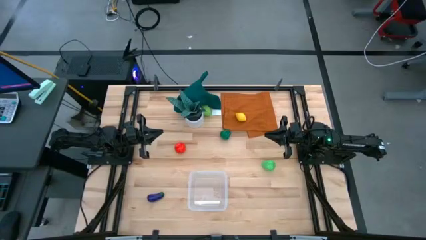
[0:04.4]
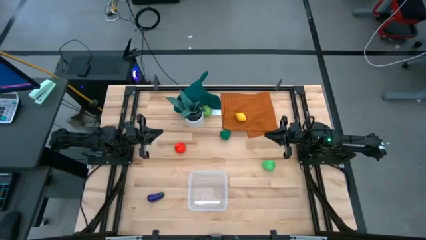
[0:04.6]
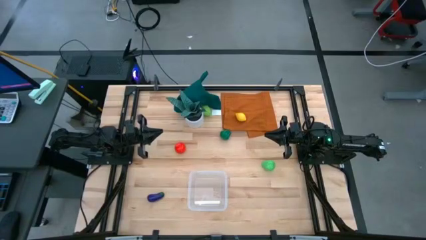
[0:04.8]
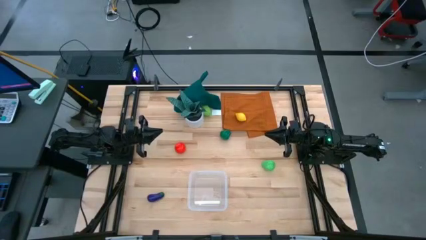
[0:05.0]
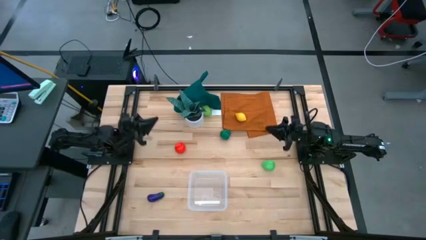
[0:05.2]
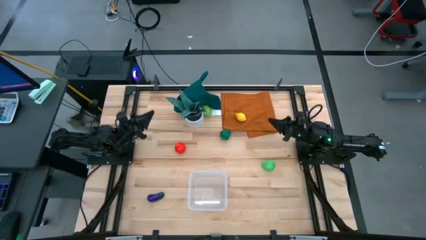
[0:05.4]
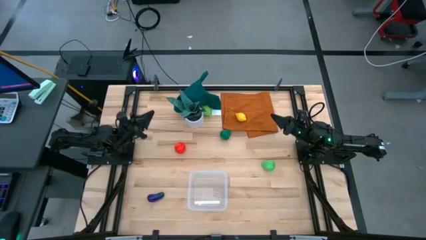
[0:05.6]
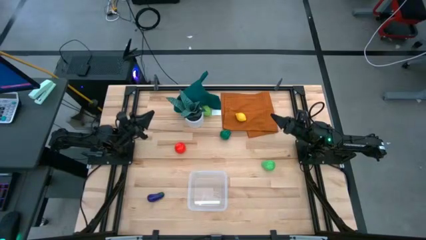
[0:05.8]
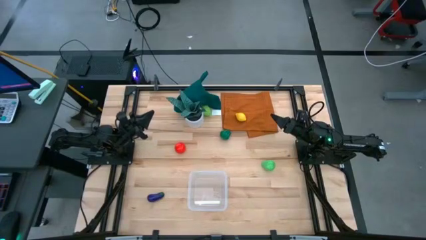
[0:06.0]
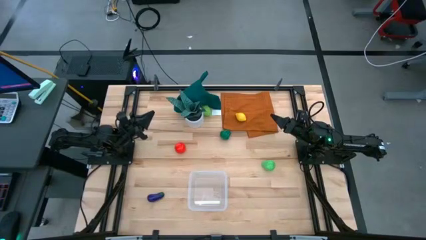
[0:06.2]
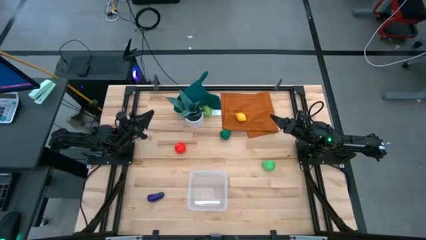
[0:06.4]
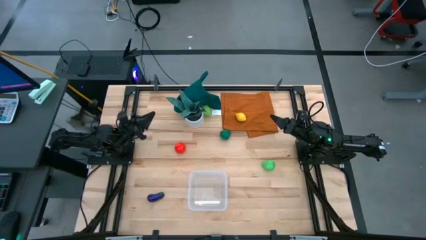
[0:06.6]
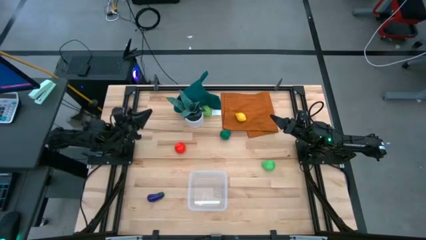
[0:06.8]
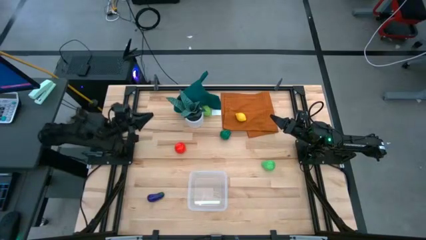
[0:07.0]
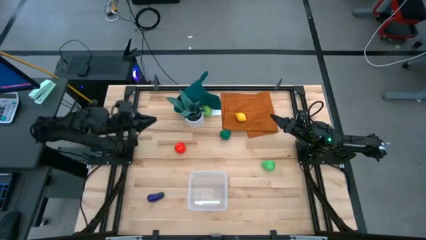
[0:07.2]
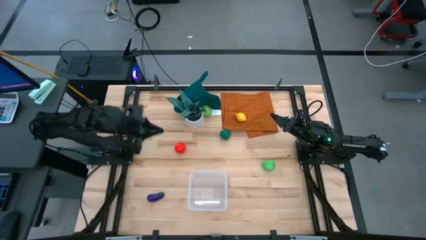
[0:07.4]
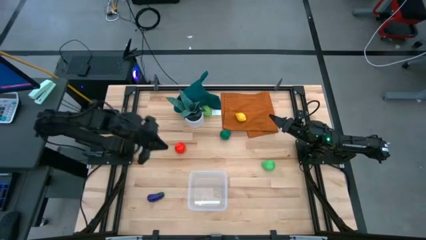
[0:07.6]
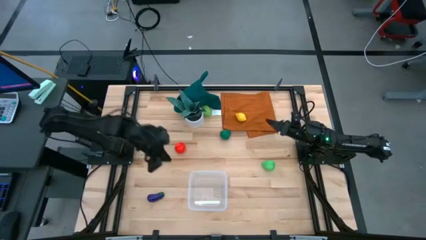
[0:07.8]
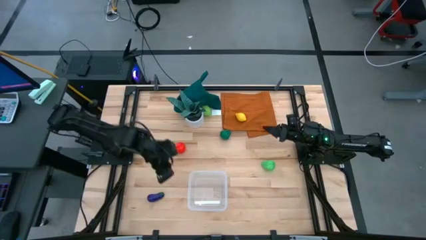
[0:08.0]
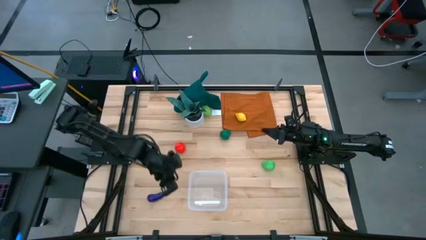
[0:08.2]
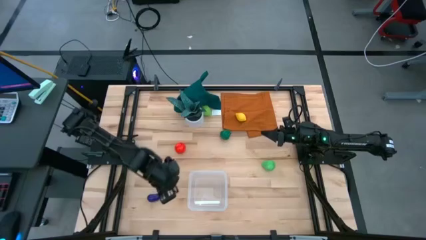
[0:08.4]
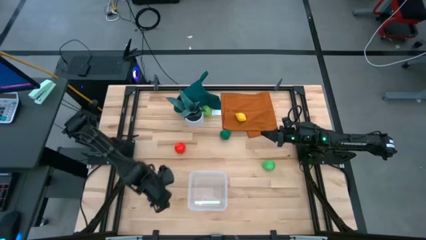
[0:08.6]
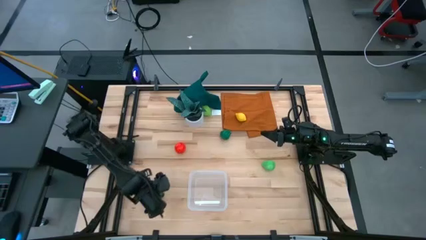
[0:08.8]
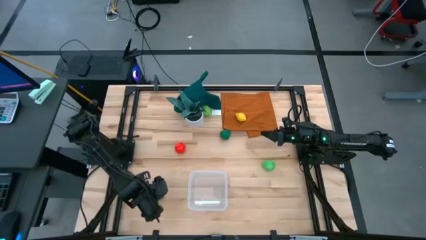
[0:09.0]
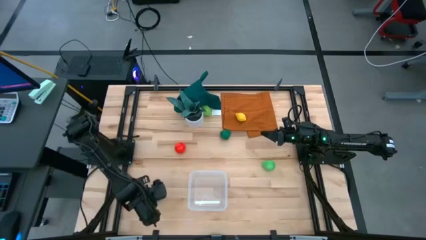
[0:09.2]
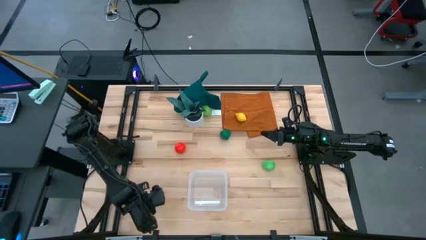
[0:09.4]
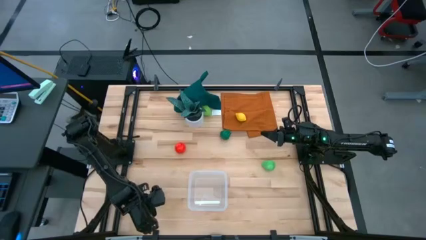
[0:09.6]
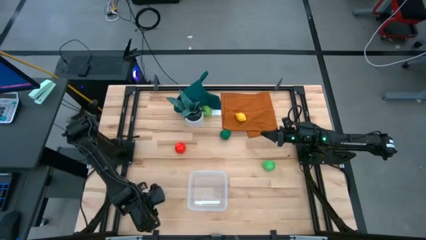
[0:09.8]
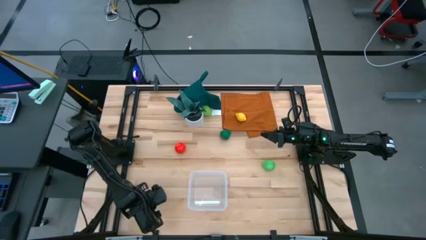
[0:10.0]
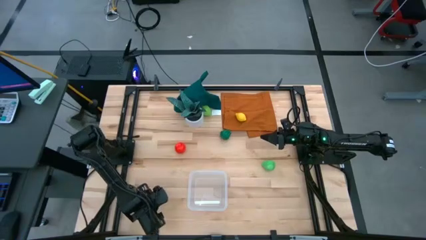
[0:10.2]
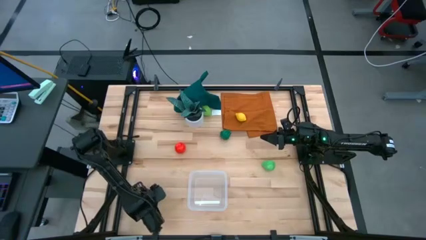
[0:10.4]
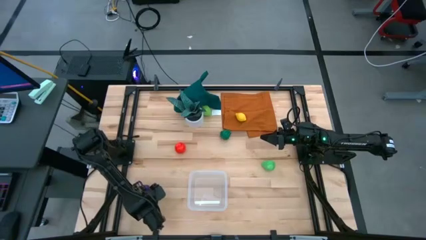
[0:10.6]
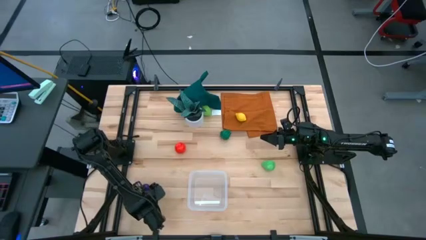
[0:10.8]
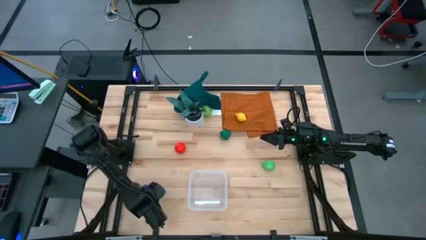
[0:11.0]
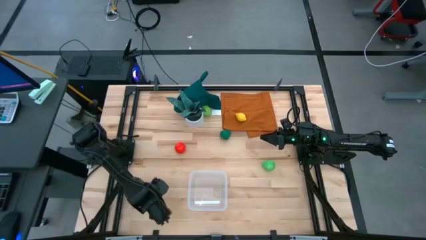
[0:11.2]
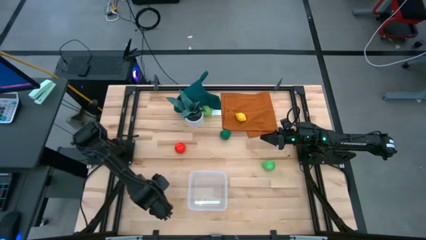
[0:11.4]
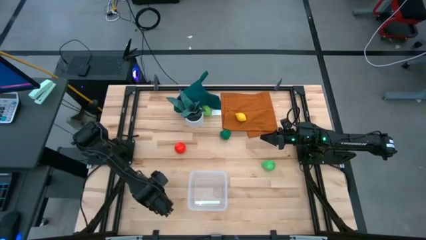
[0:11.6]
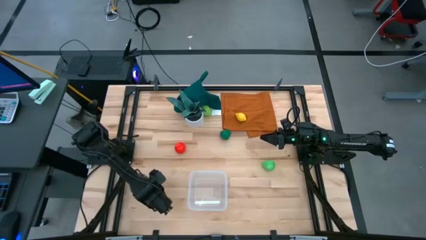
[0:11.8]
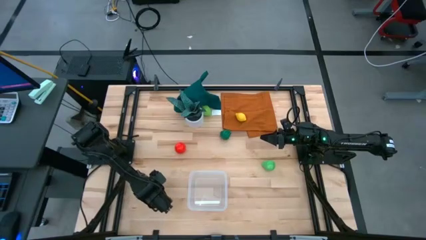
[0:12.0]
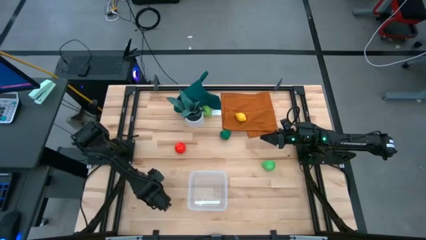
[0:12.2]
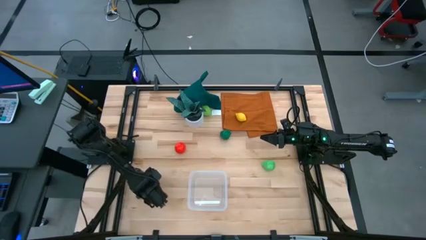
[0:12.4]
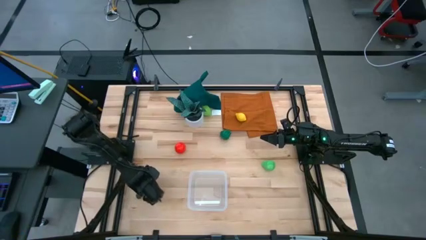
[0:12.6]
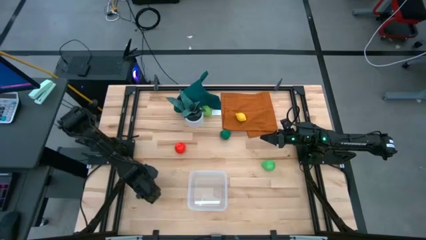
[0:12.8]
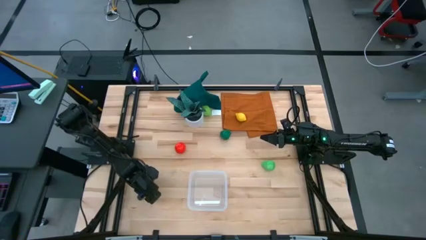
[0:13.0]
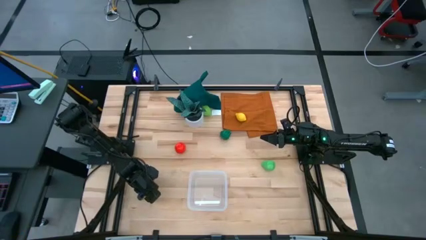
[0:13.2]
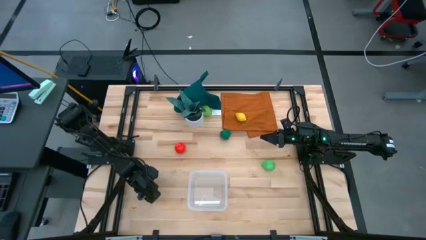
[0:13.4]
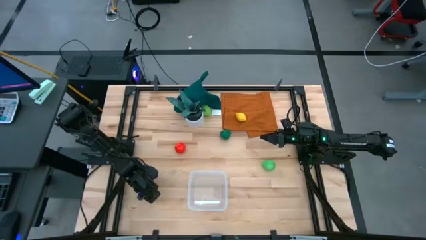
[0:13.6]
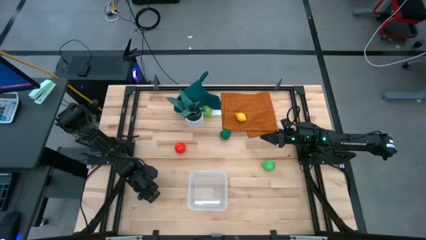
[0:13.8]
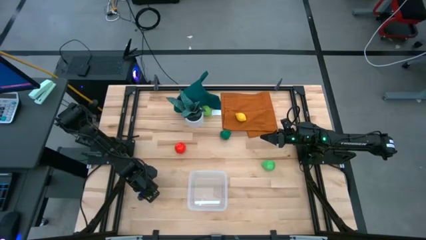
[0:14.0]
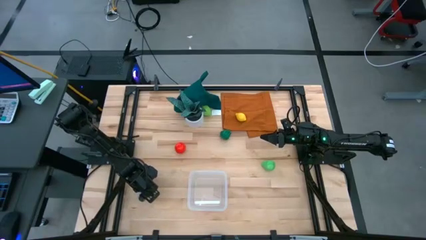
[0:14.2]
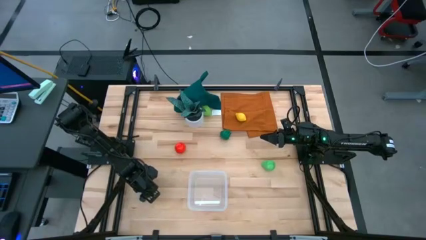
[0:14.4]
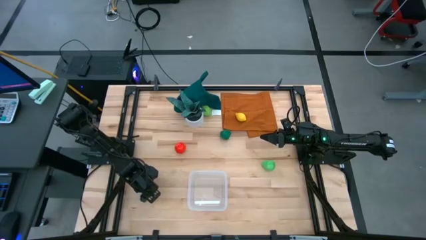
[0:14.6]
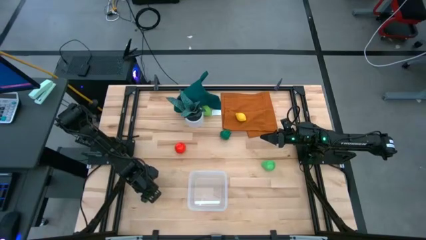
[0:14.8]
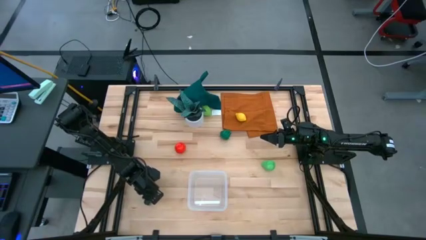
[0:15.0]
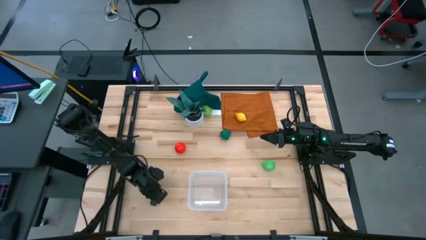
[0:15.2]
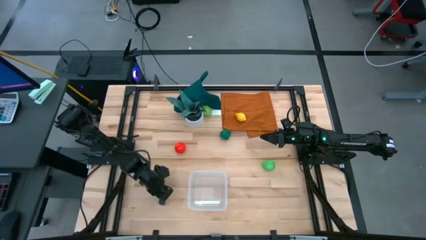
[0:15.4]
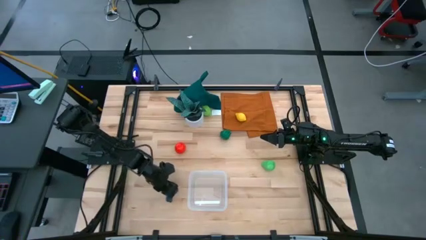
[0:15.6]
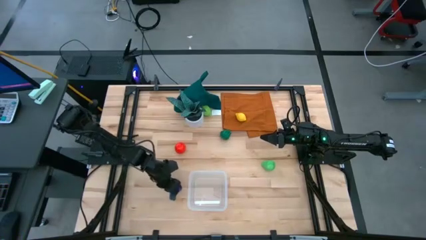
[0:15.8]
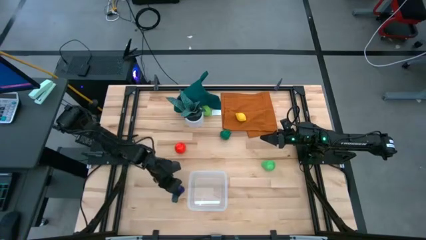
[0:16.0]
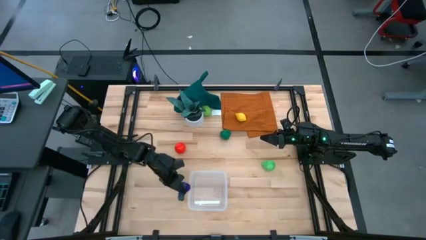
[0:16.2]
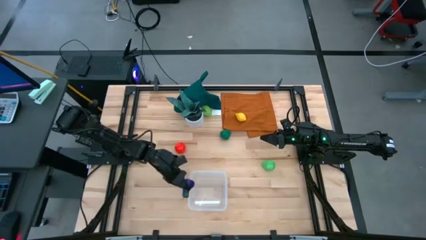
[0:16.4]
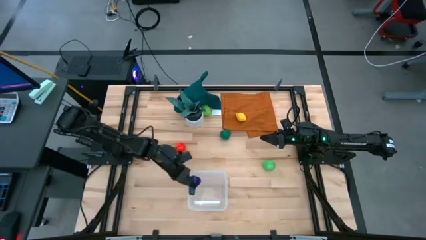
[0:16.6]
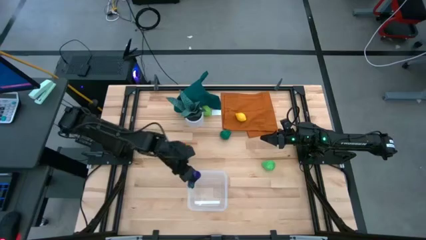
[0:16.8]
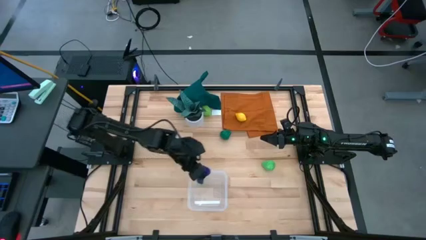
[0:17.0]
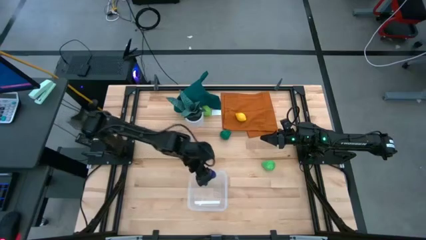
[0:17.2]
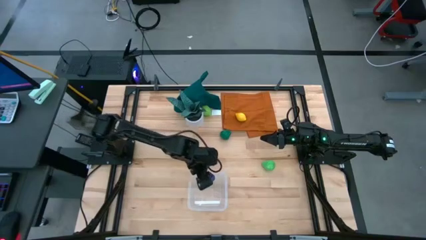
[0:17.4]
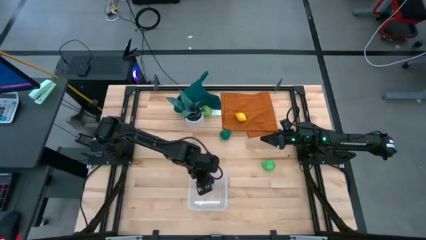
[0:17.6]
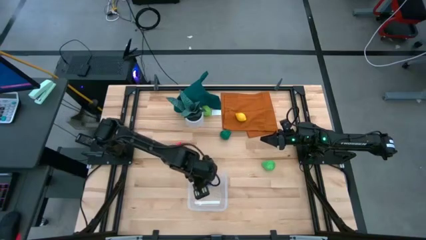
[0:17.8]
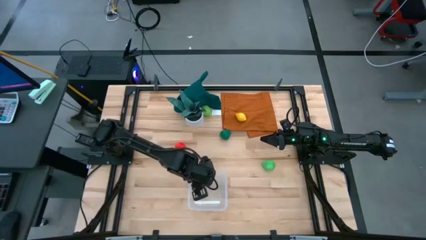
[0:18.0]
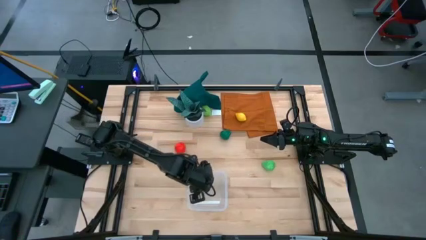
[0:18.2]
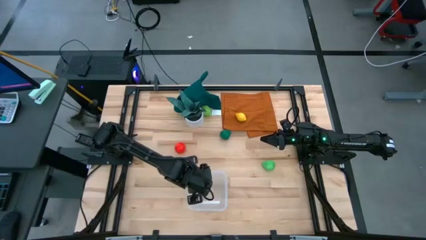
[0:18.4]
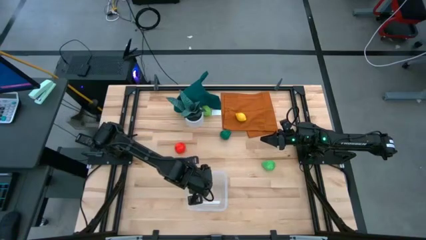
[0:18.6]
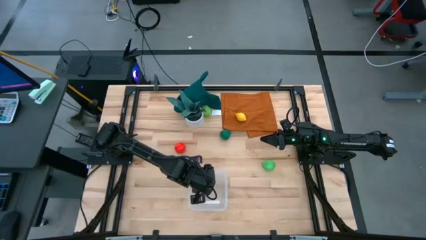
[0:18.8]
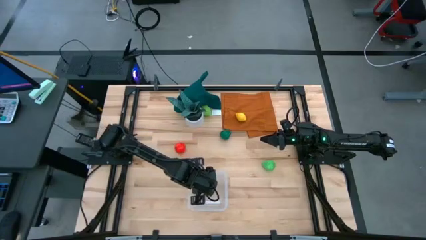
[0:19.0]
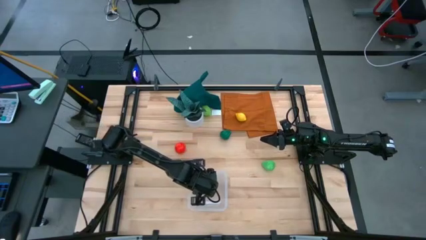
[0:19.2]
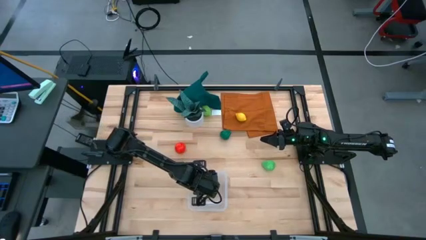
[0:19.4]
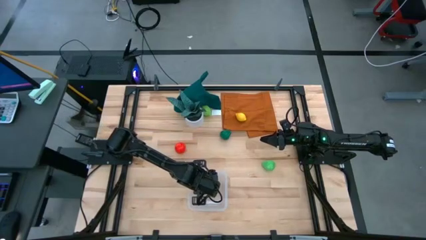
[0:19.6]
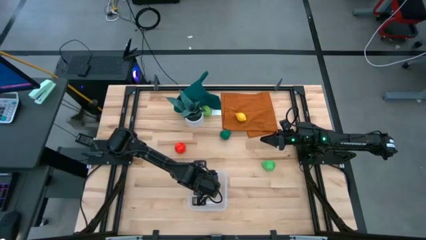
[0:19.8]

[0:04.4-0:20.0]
Task: Pick and placing Produce into tupperware
Put the eggplant into the transparent bin
